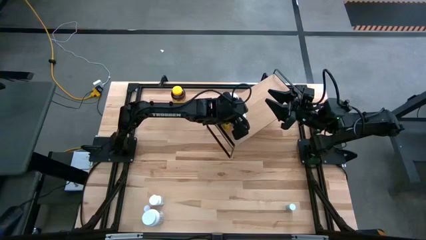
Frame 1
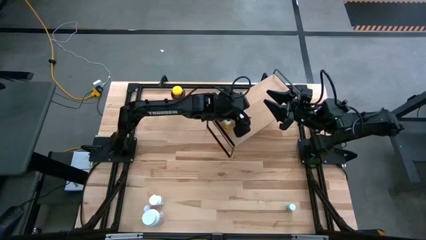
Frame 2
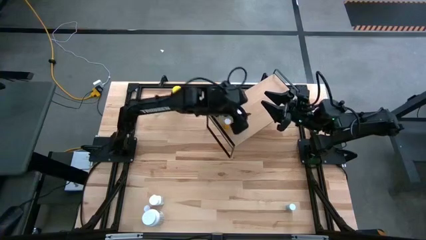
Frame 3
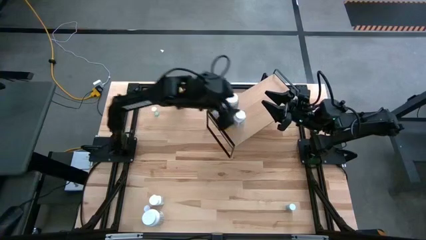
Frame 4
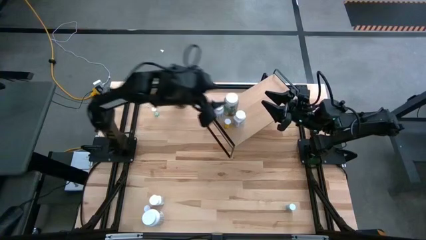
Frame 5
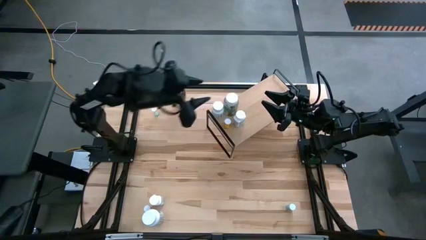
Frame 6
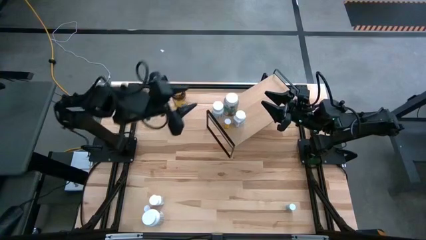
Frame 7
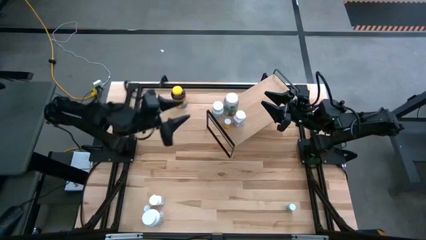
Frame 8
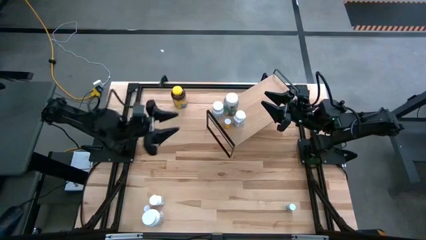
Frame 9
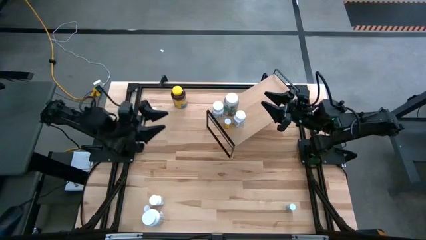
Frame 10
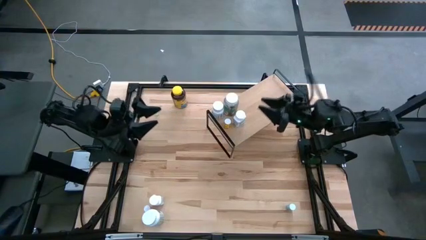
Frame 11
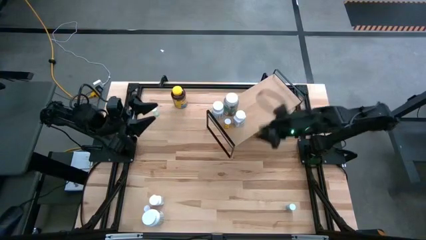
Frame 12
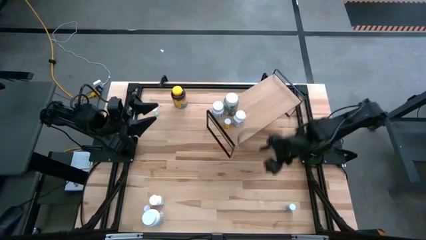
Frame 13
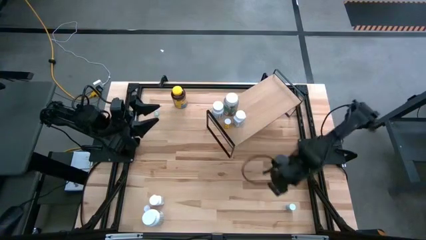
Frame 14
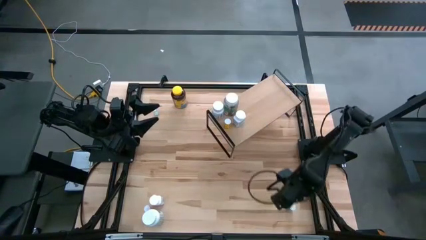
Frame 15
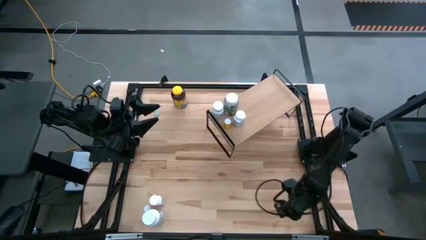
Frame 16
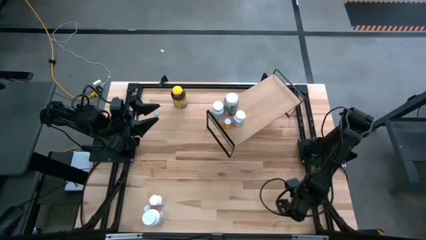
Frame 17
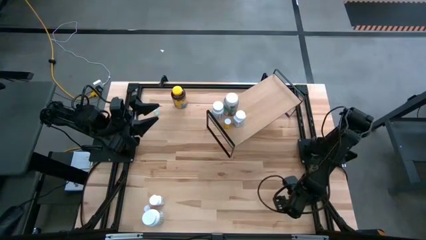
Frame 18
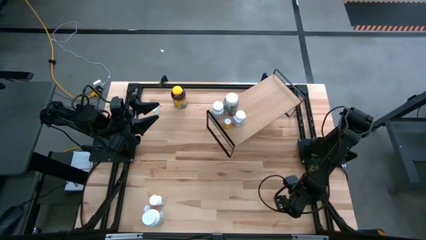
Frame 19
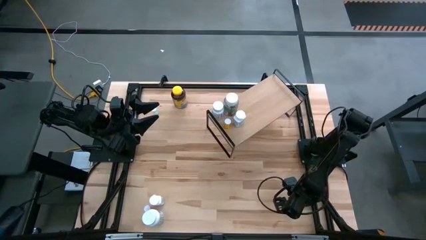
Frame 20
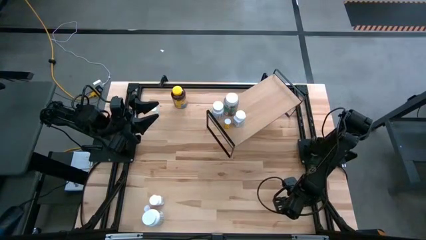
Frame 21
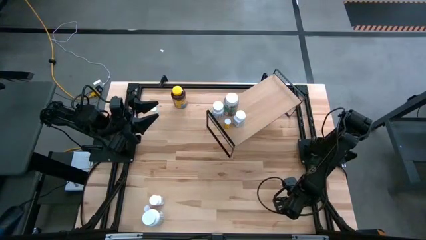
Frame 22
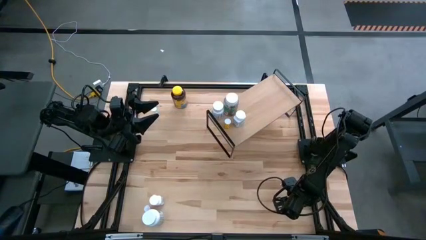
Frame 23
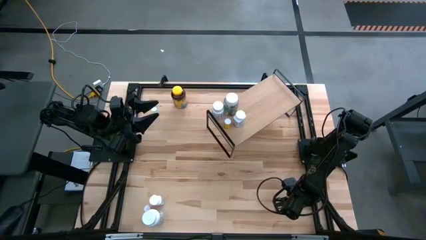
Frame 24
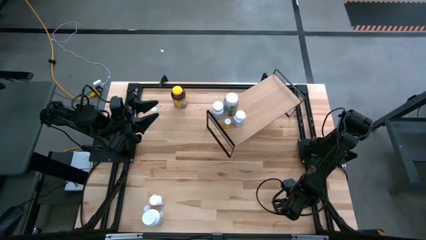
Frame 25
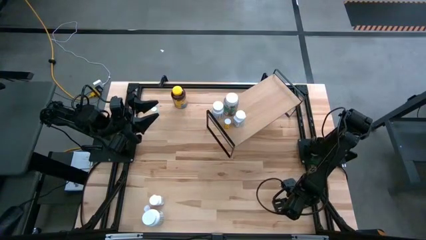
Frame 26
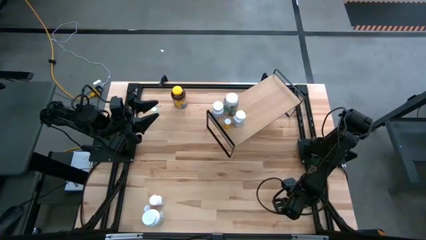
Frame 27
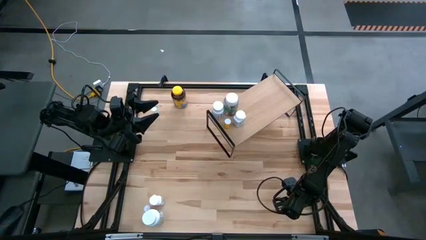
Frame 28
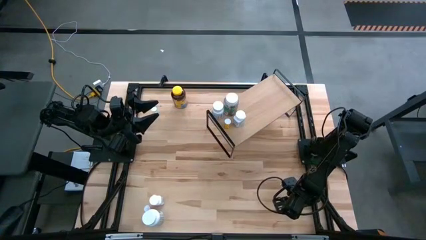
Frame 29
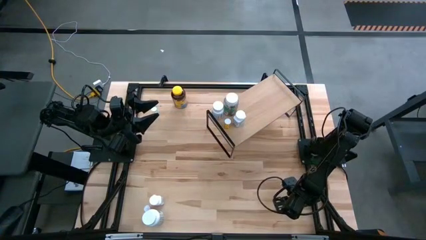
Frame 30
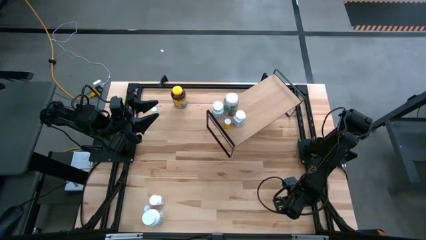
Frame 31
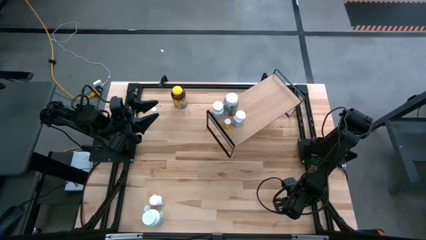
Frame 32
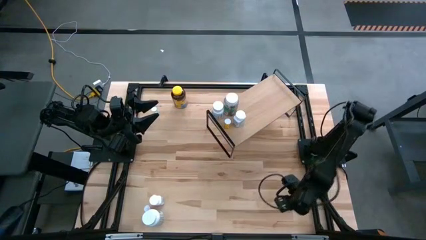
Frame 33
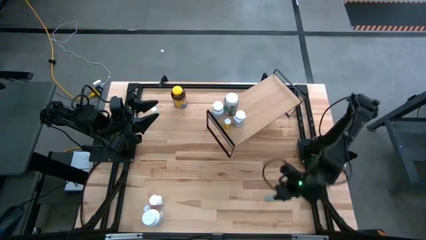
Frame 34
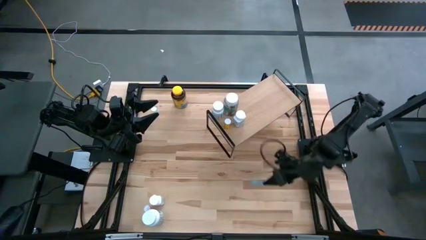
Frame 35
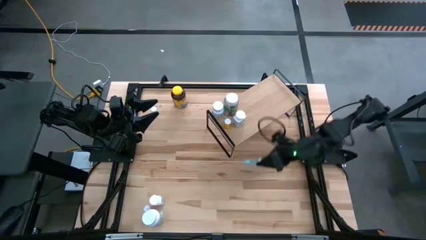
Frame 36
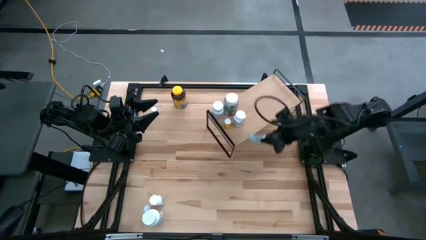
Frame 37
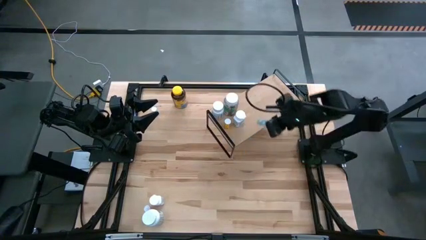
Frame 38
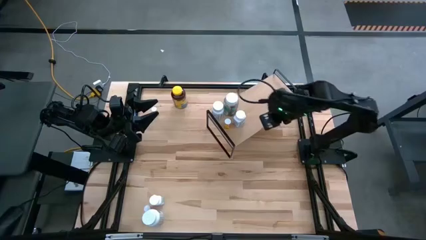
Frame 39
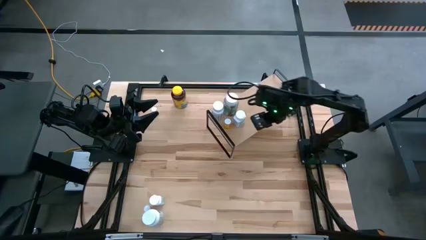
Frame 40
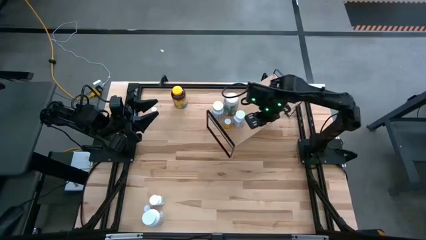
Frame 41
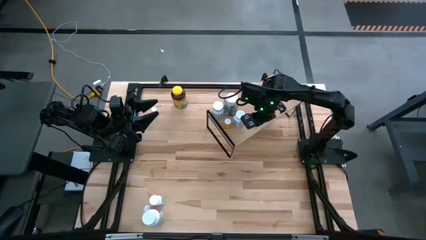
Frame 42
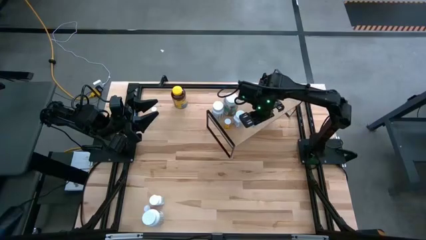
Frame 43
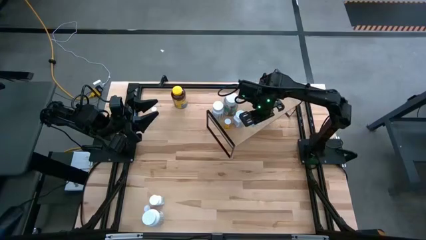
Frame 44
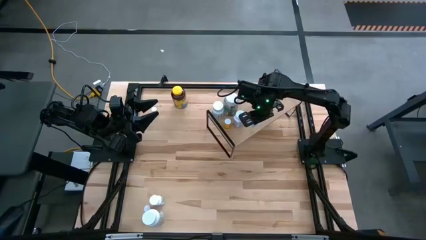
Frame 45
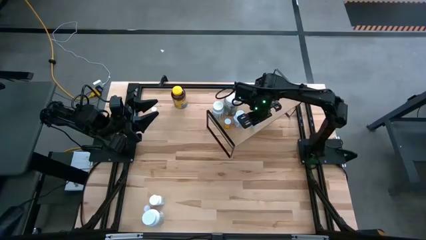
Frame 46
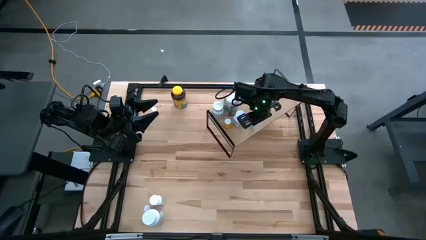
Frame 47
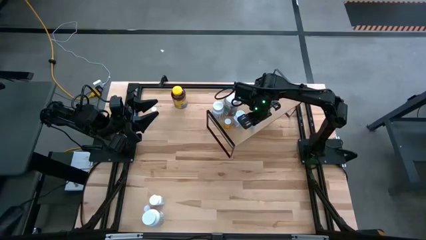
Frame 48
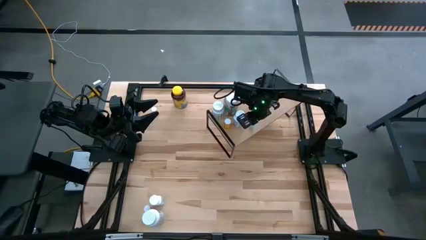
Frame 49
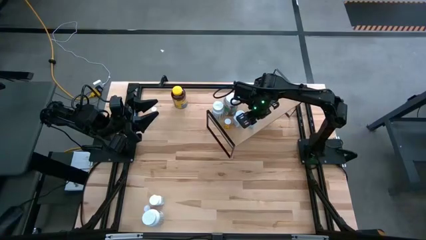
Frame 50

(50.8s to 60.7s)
Task: Pick and place medicine bottles onto shelf by color
Put the blue pill bottle on the shelf

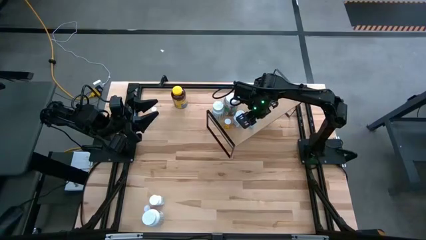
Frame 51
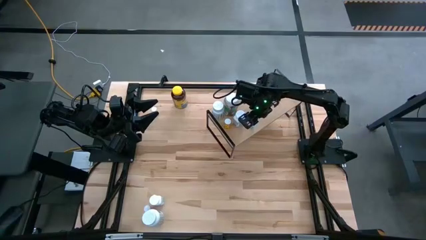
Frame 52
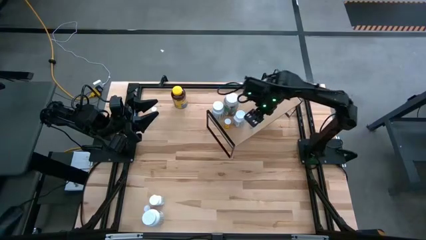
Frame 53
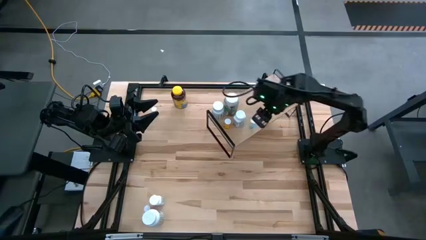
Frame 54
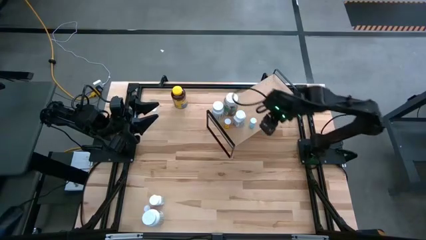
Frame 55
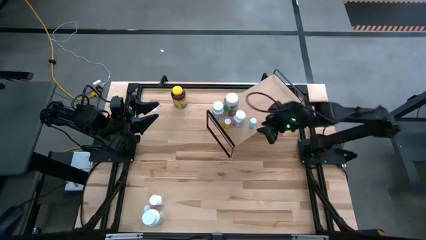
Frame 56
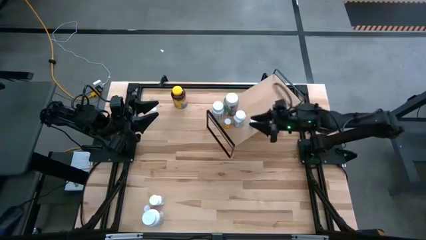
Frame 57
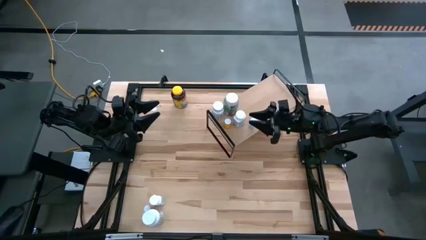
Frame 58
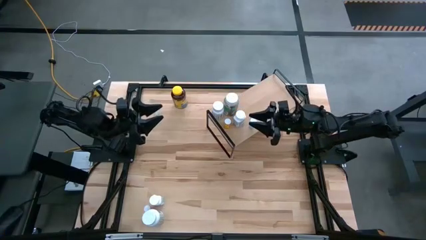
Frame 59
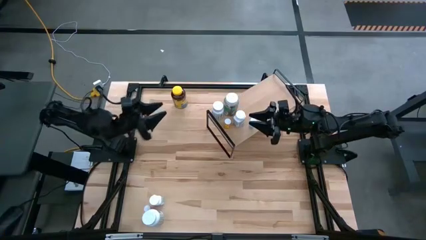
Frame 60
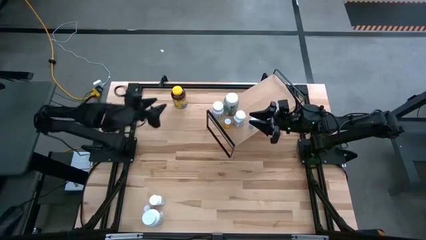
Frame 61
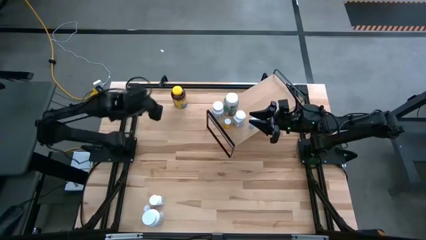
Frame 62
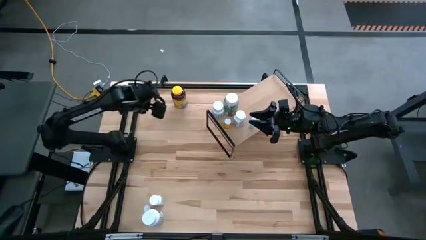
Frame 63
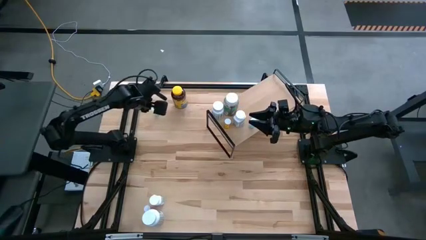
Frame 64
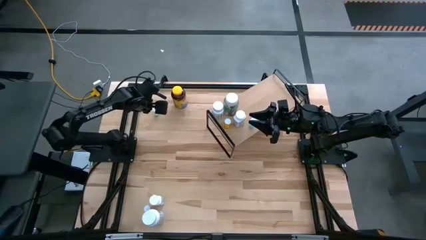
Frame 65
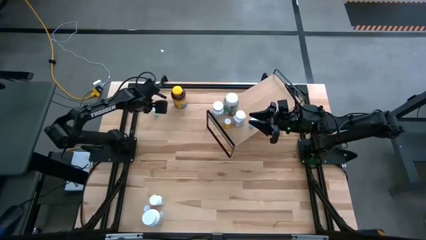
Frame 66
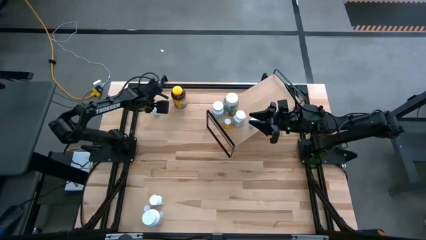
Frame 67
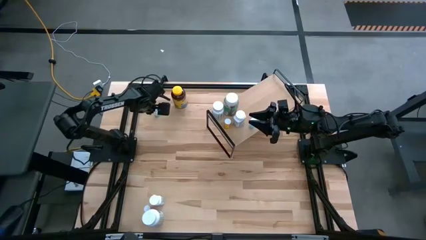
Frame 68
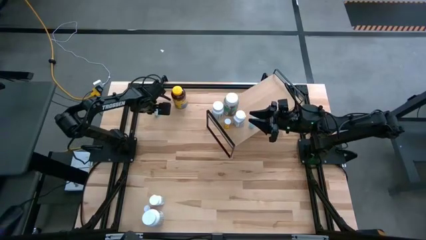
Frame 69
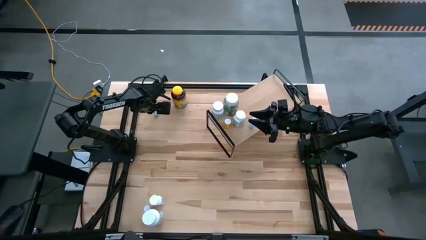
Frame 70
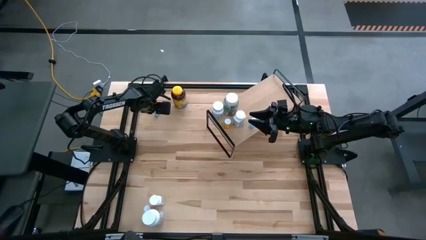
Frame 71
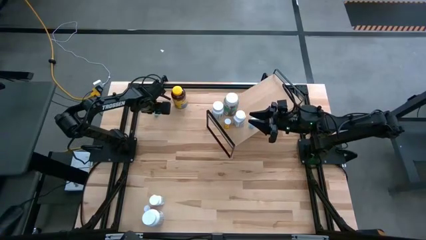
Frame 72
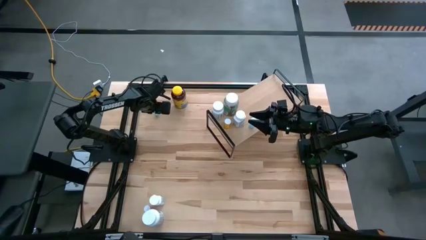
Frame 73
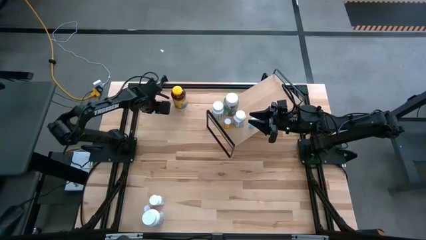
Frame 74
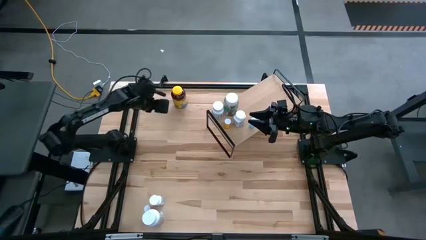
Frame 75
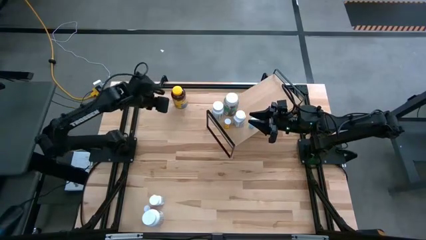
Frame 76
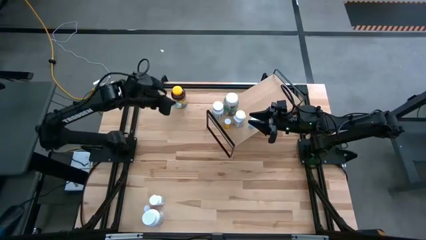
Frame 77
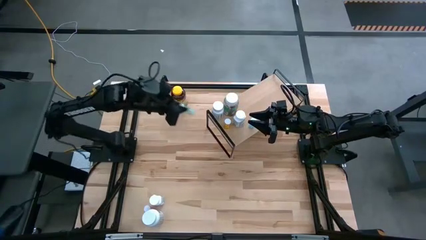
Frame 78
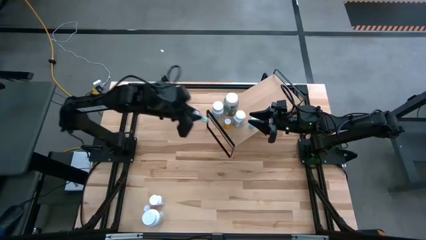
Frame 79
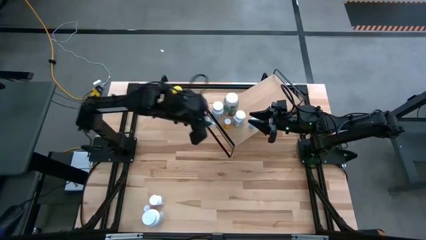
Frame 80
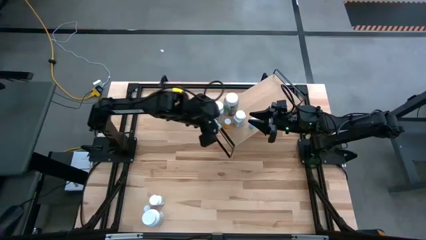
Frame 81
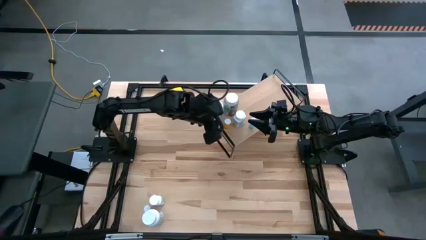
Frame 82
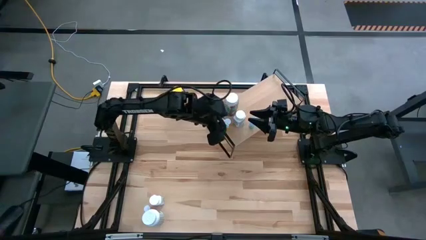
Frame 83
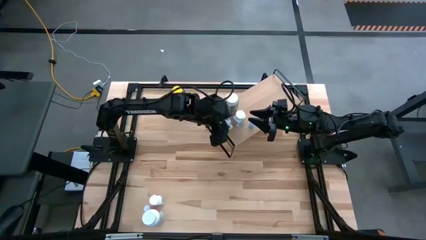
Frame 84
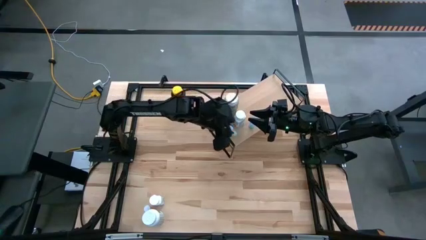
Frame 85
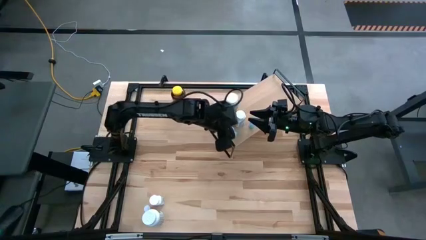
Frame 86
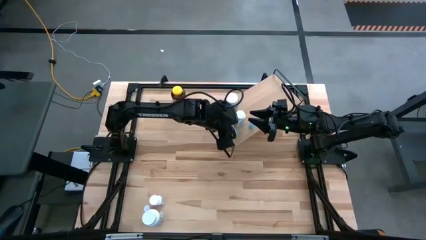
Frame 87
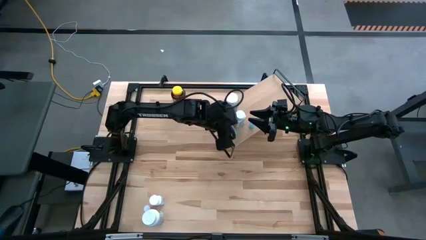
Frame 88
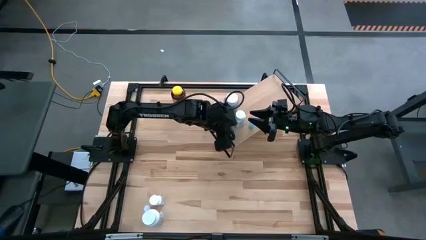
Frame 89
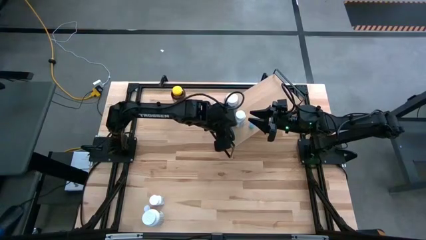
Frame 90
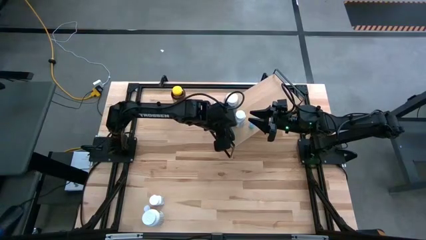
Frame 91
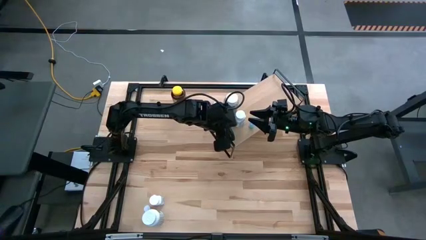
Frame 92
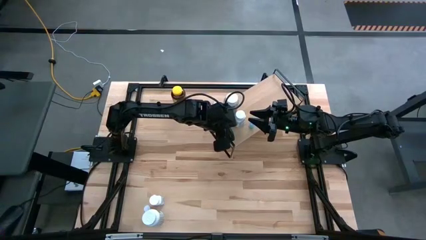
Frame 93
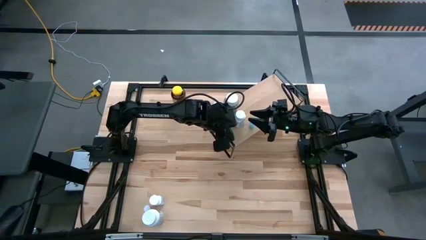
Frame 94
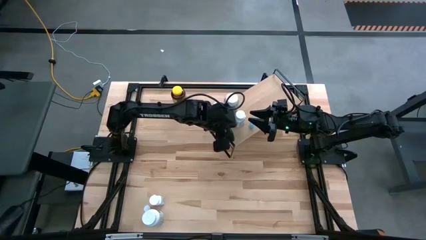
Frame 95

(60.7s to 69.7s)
Put the green pill bottle on the shelf
